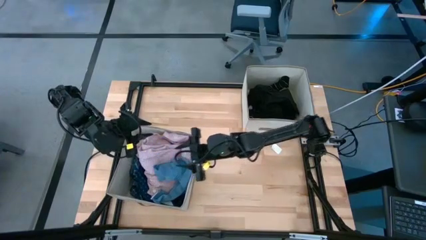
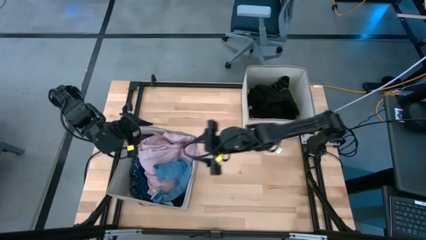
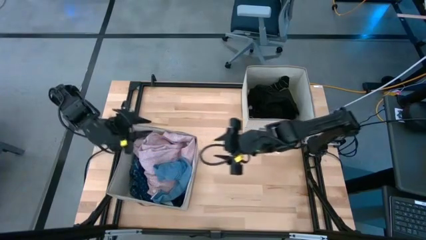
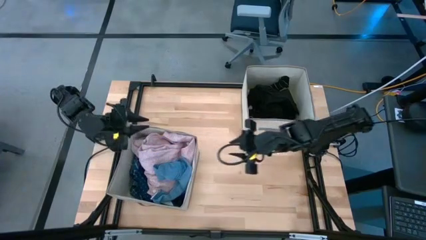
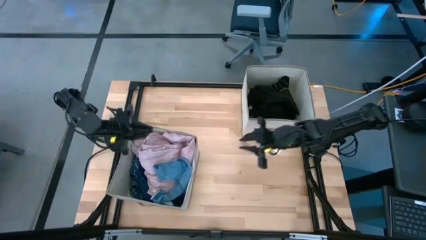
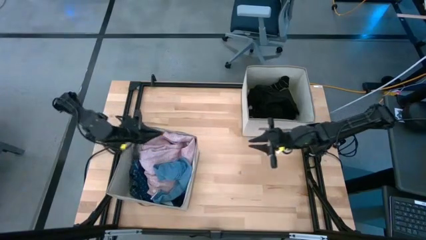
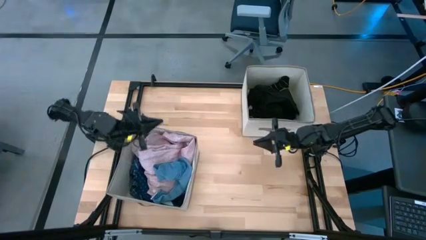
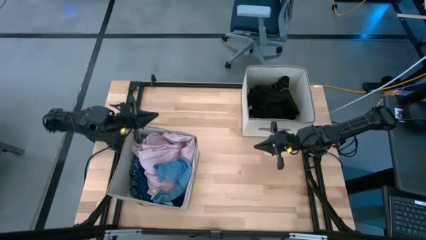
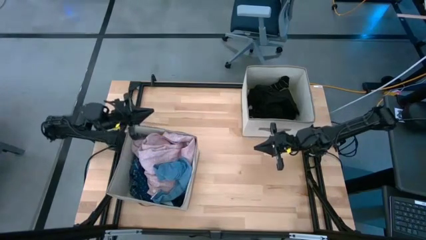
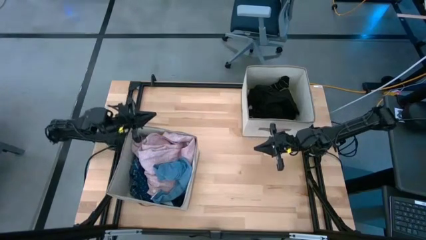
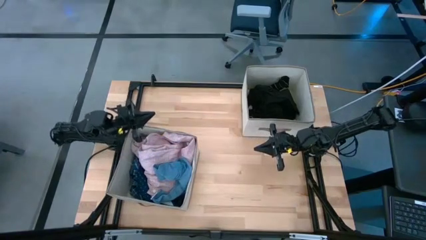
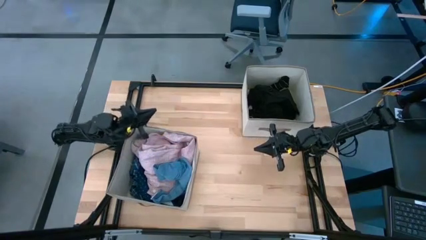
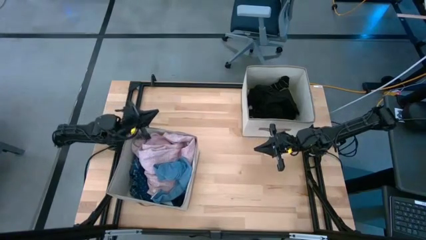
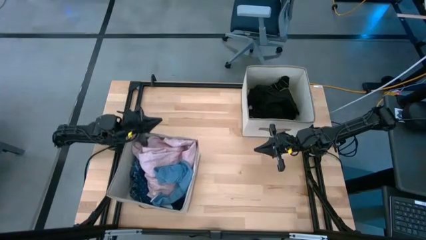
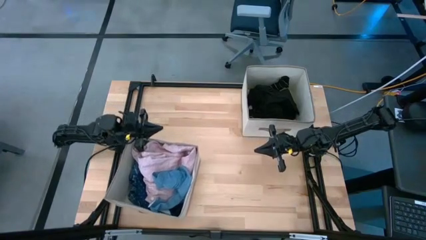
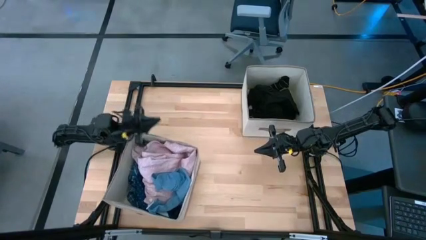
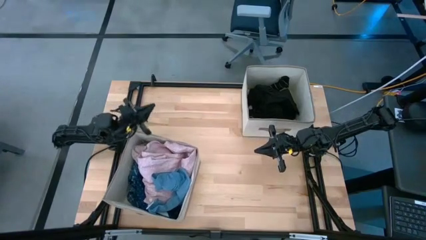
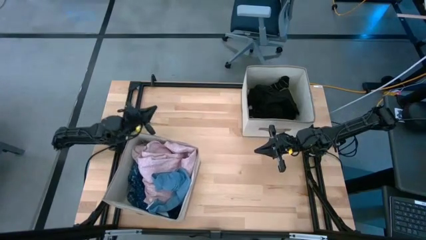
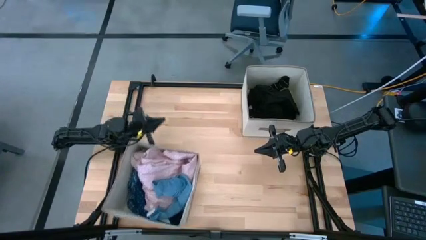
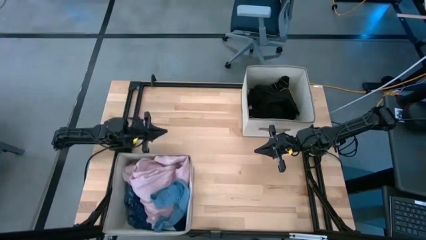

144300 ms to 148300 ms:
Task: Sort clothes
Adjust the bottom white laundry organizer on the table

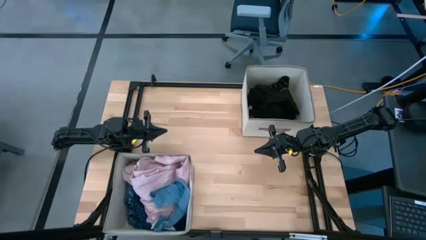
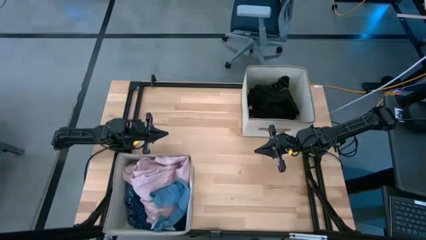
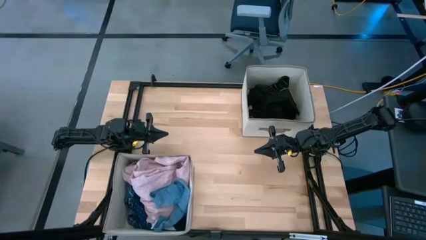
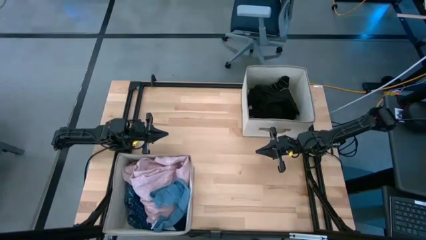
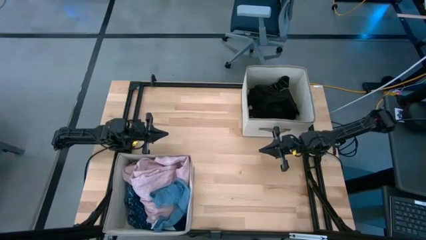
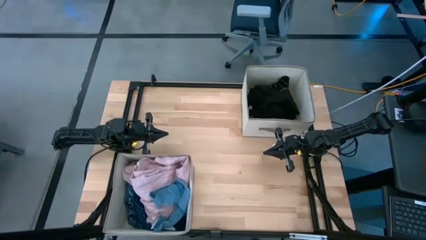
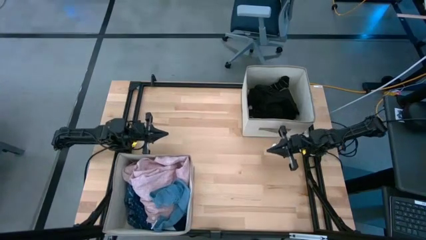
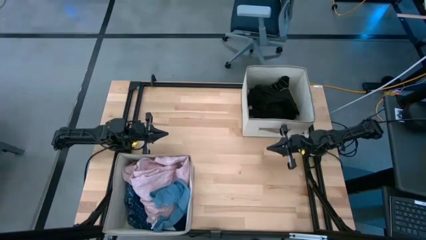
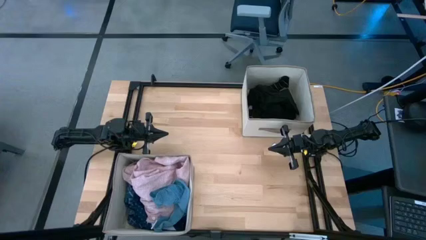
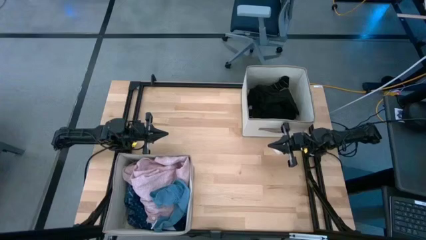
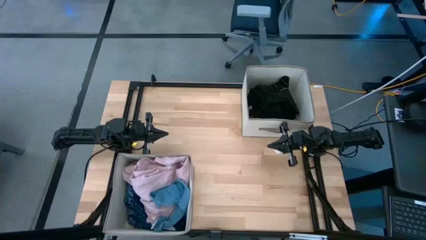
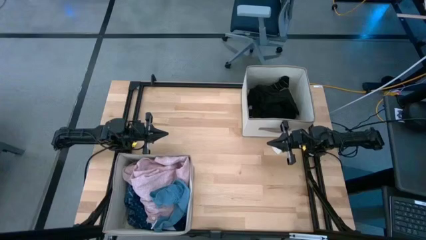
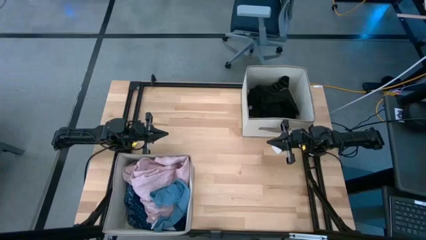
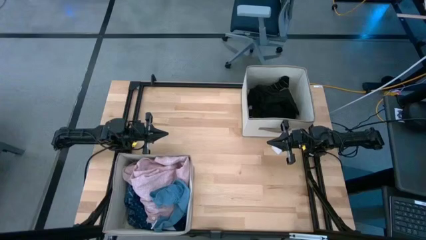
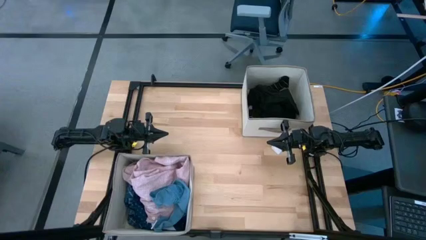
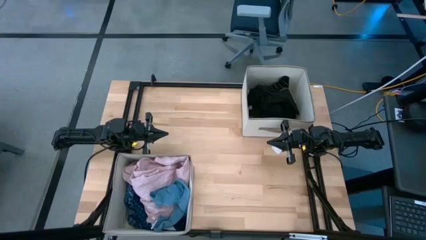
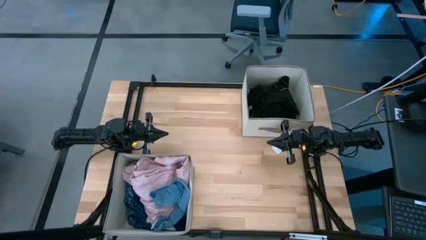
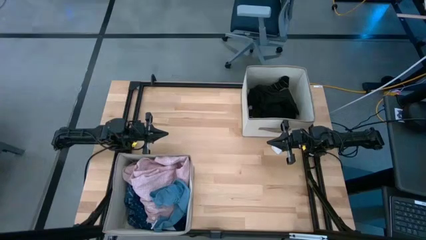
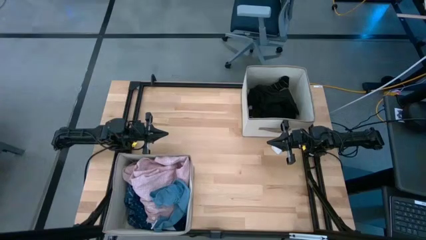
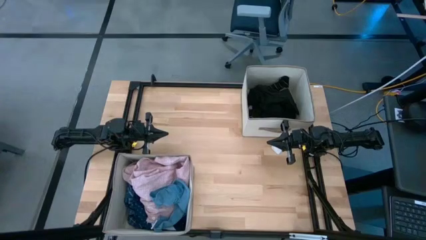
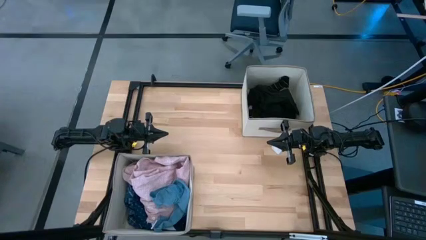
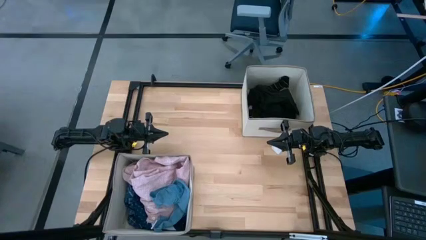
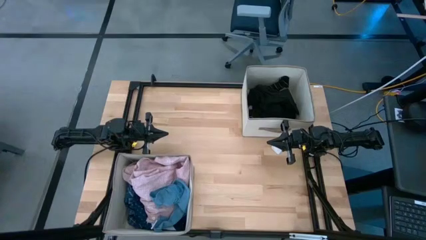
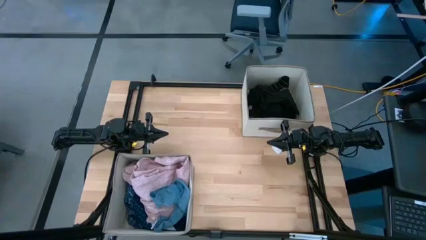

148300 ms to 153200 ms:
Return to Home Position

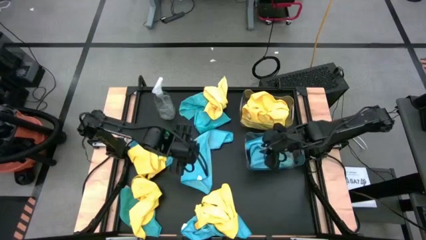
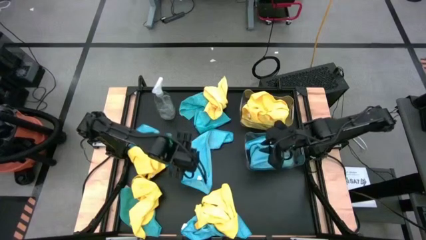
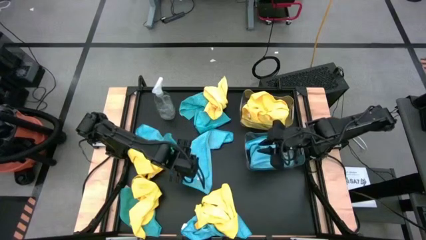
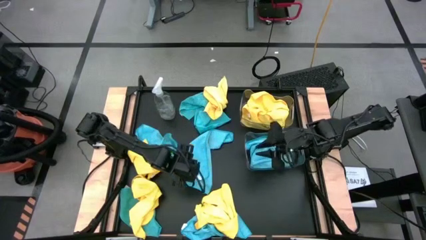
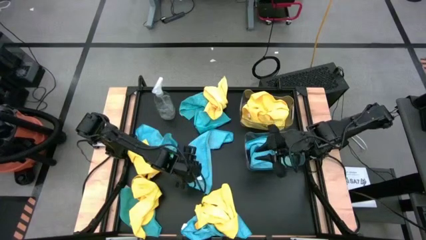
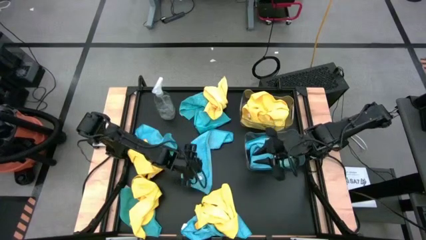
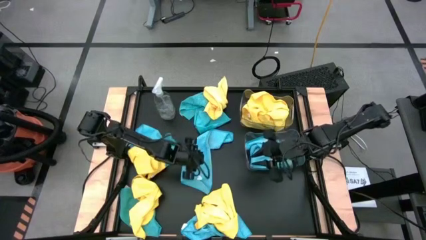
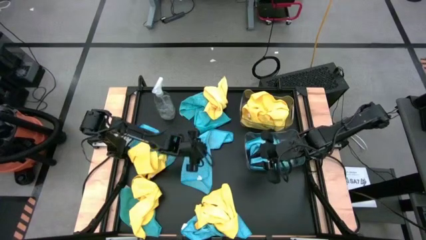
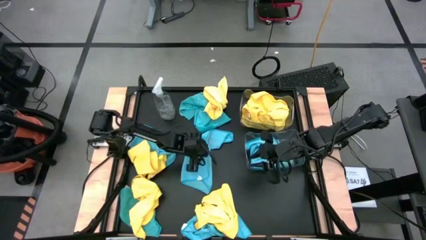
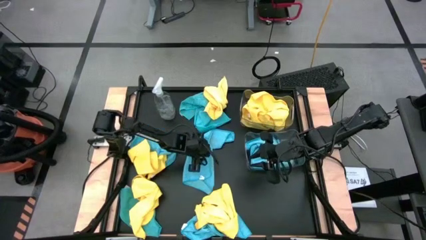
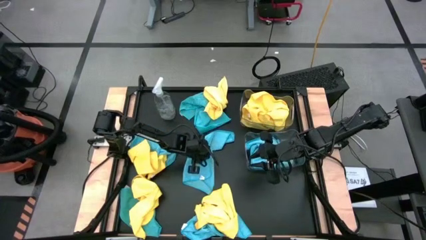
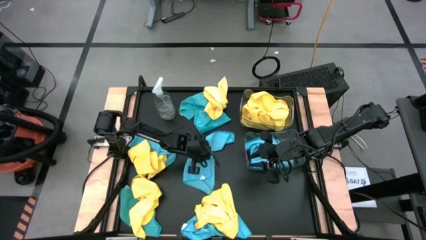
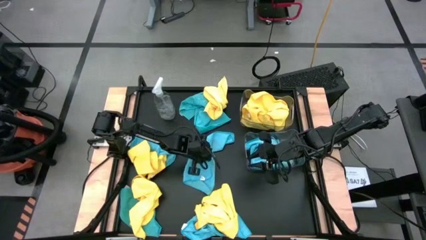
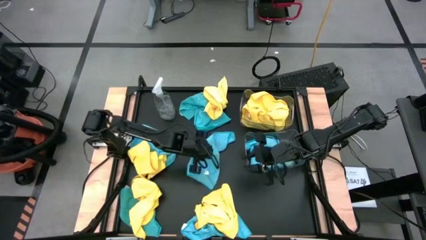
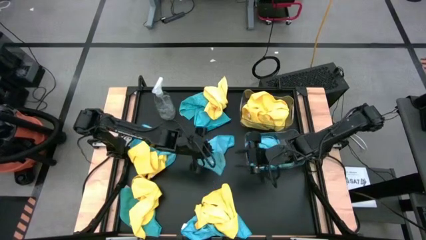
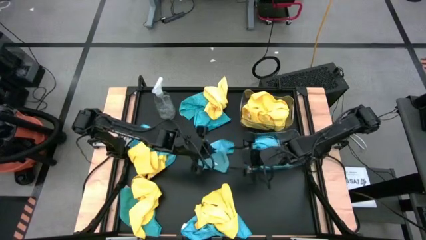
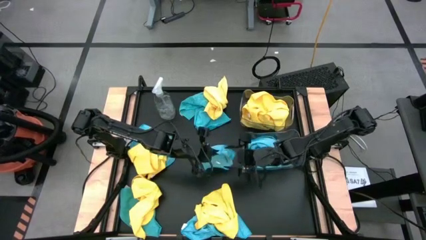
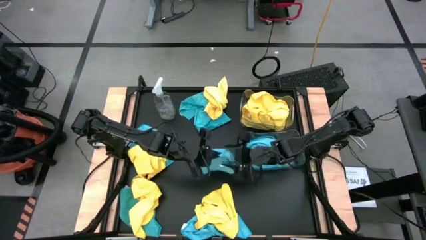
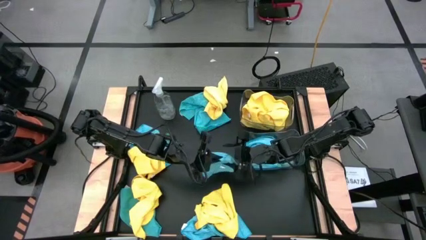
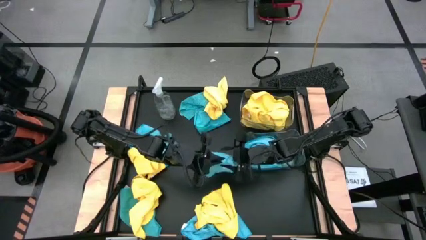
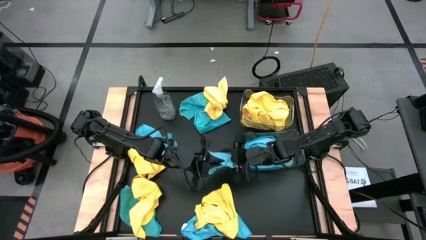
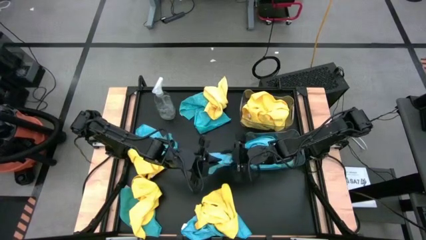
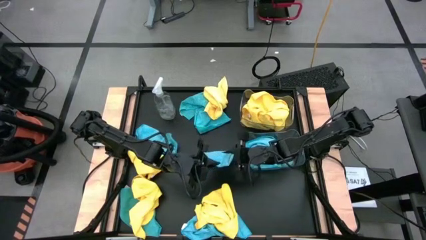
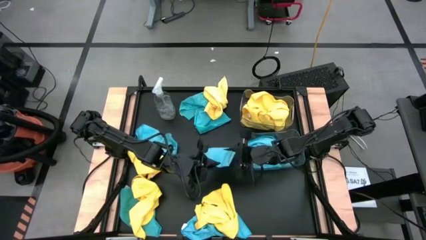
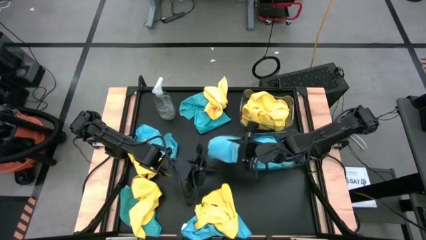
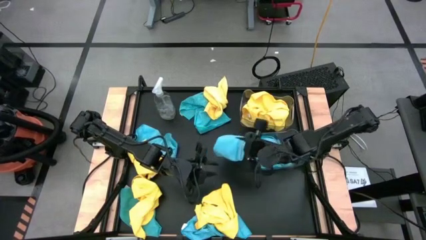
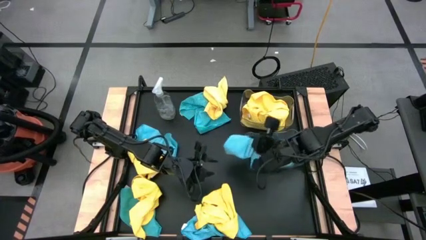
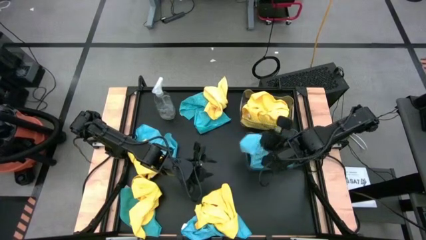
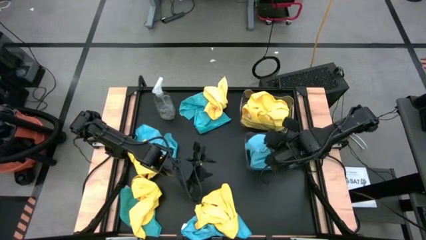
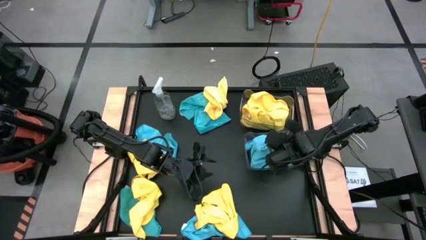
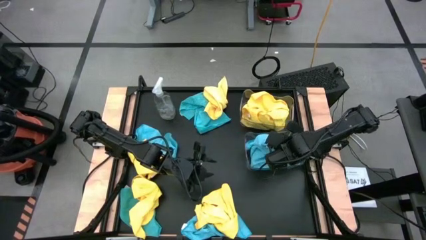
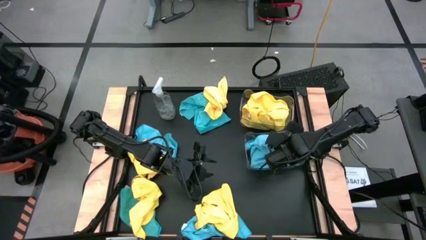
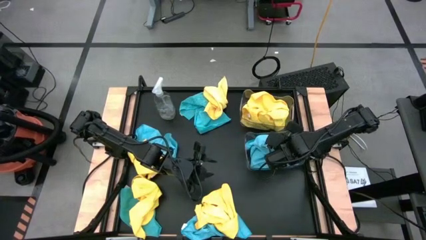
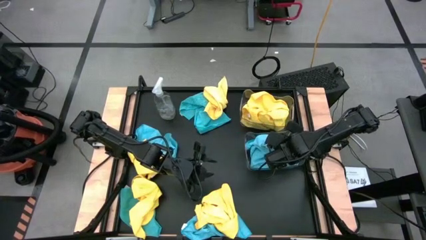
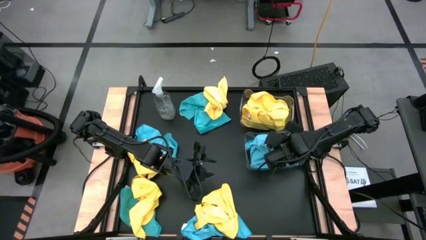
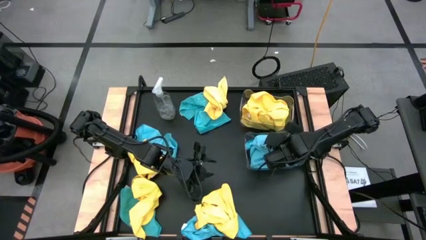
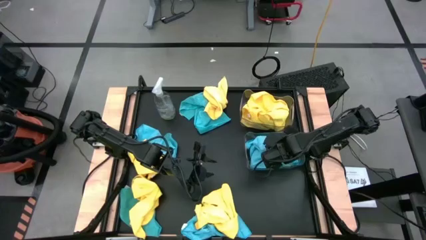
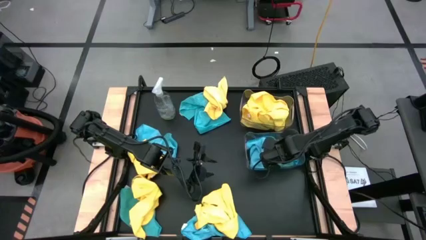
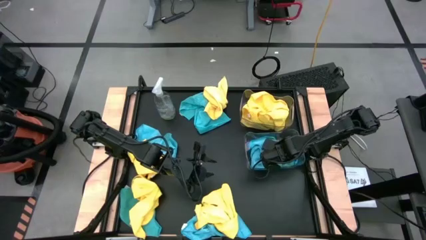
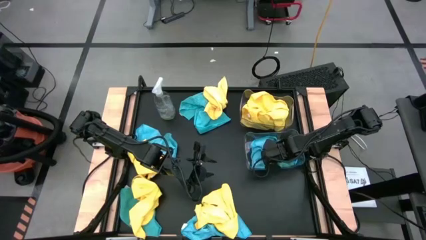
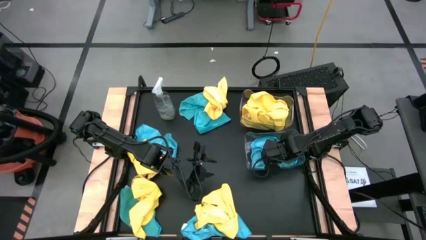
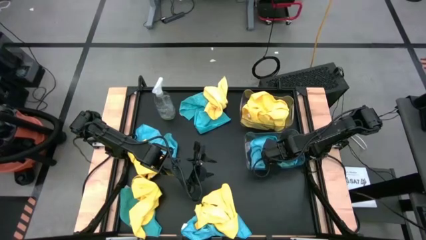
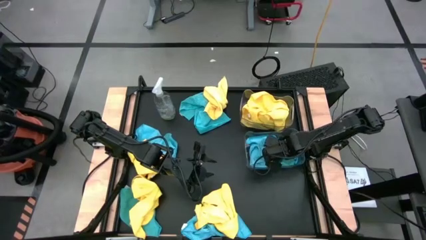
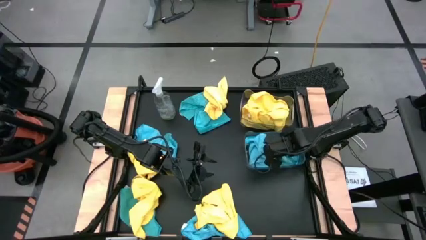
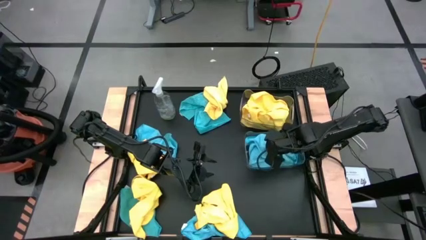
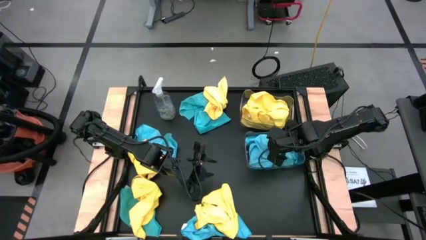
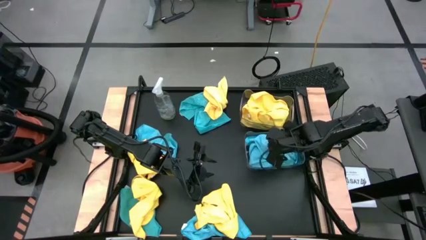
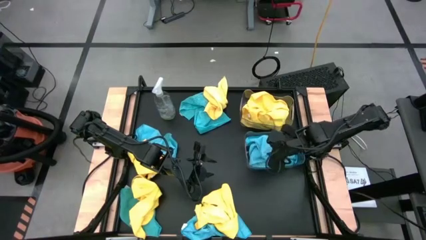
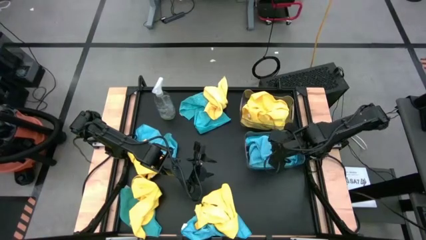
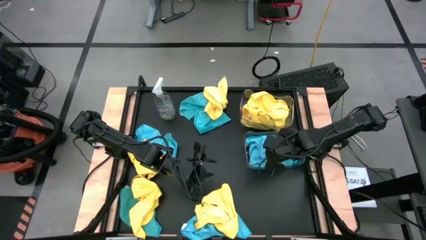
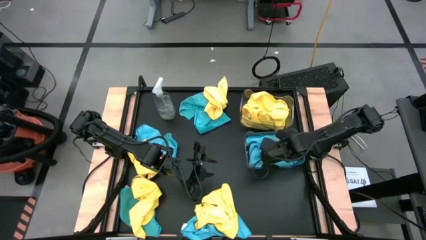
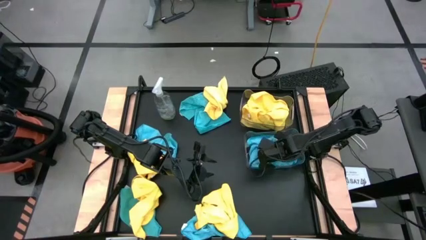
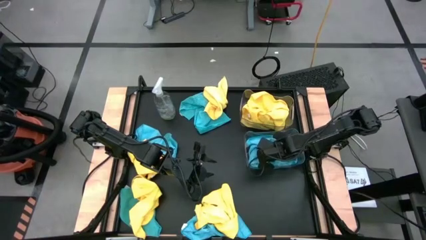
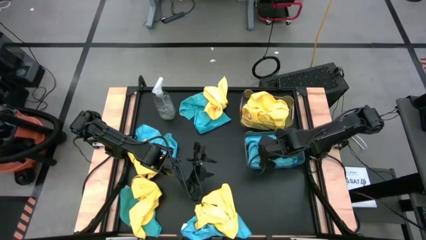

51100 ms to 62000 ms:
Task: Sort microfiber towel by color & place in baskets
Put the blue microfiber towel into the bottom transparent bin
